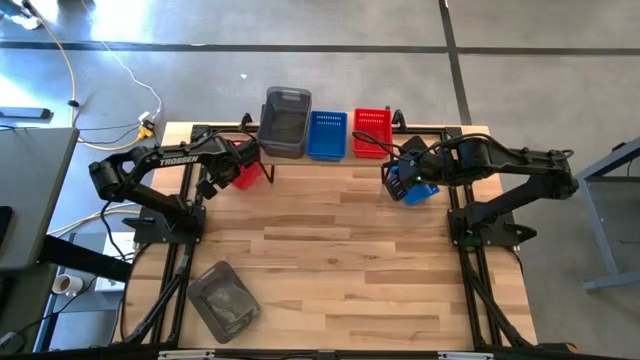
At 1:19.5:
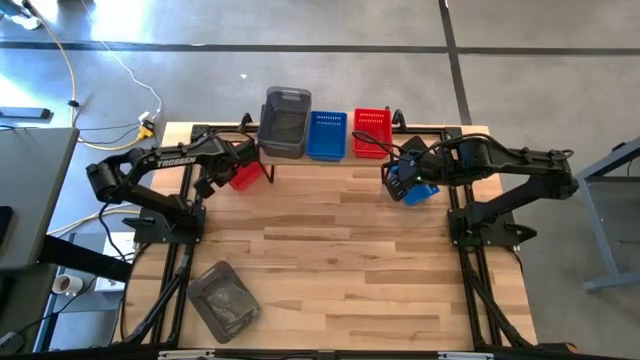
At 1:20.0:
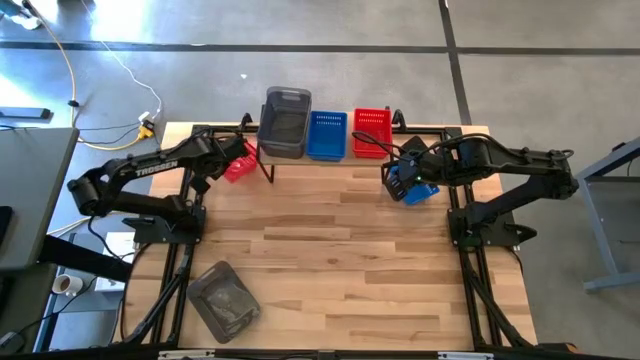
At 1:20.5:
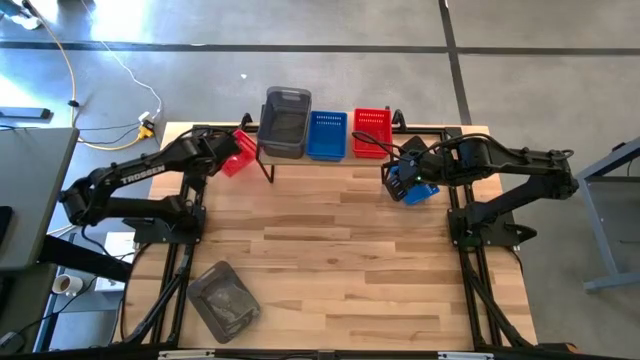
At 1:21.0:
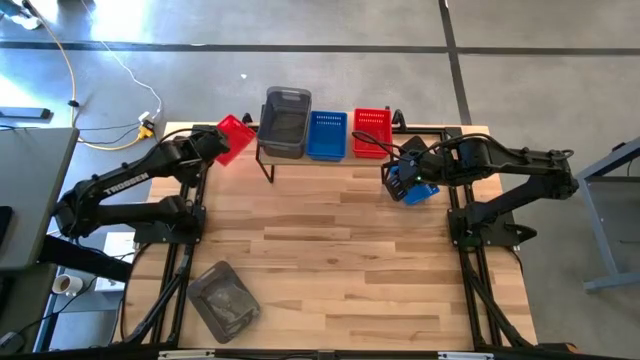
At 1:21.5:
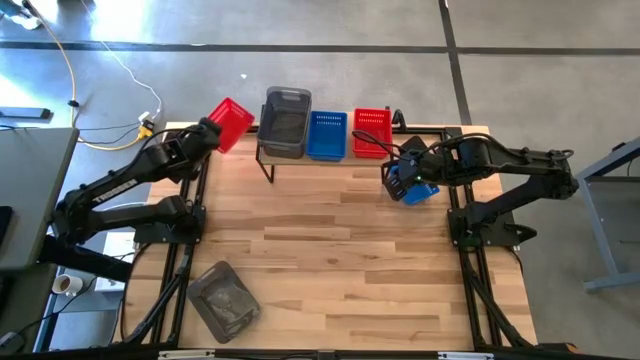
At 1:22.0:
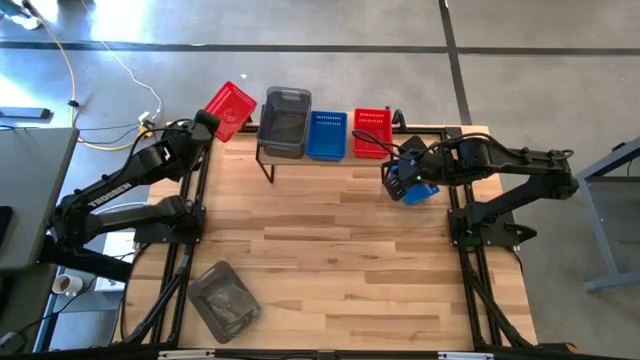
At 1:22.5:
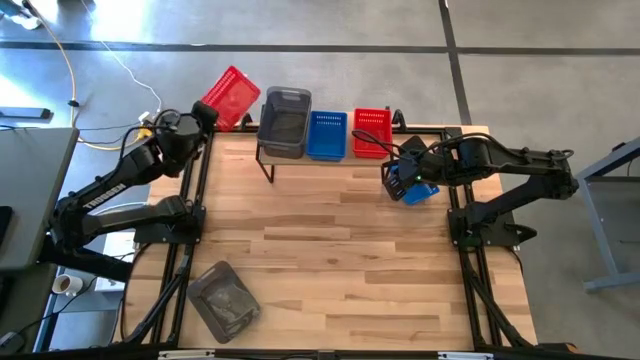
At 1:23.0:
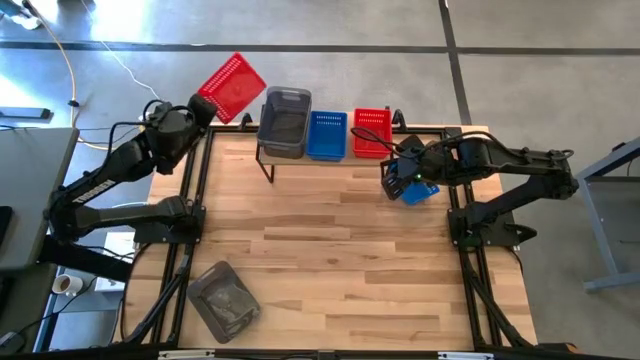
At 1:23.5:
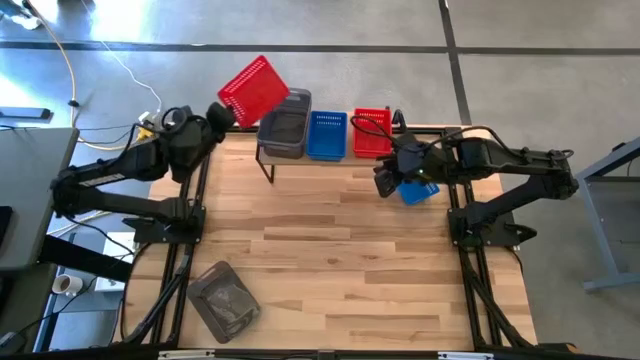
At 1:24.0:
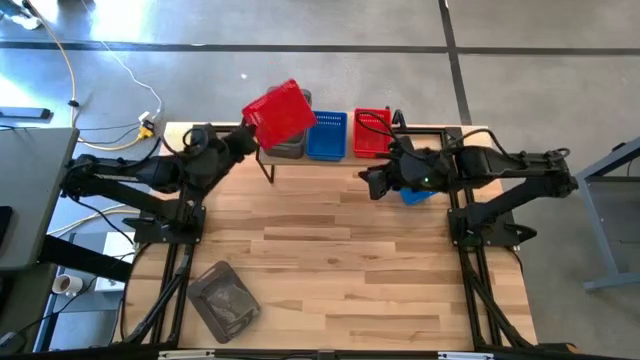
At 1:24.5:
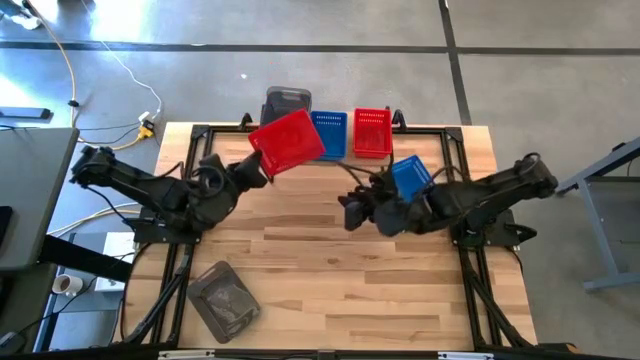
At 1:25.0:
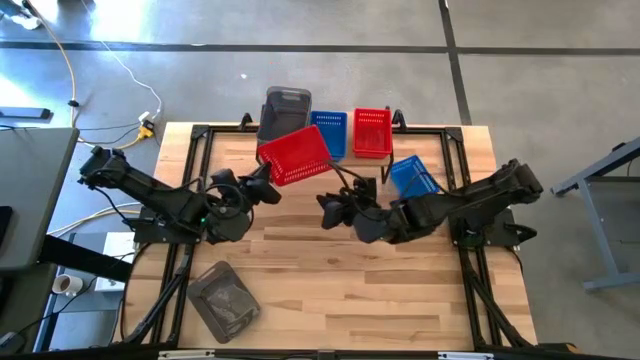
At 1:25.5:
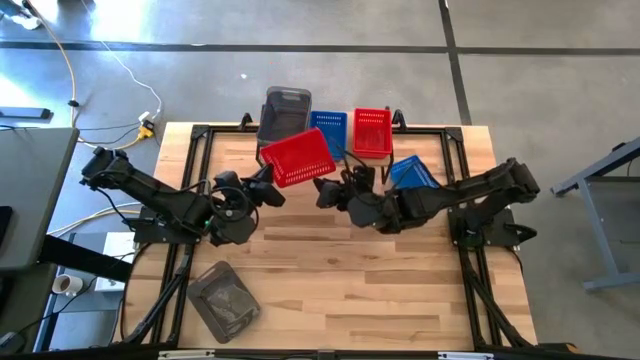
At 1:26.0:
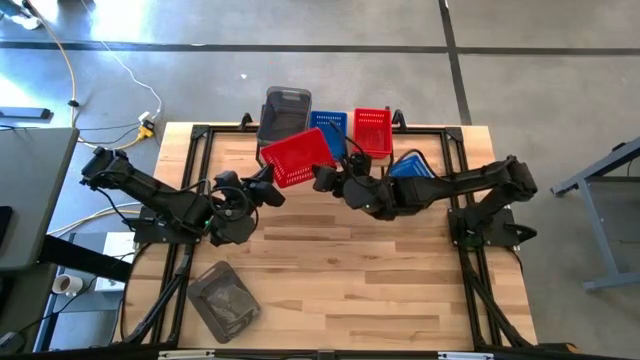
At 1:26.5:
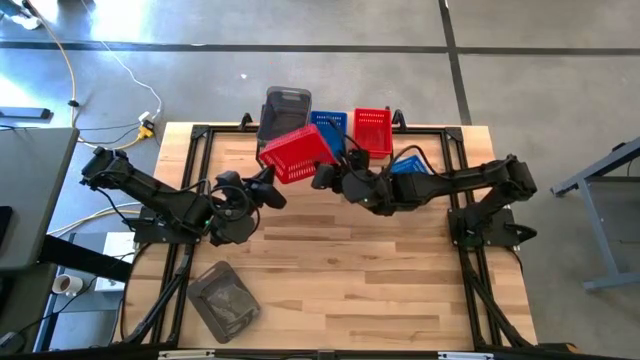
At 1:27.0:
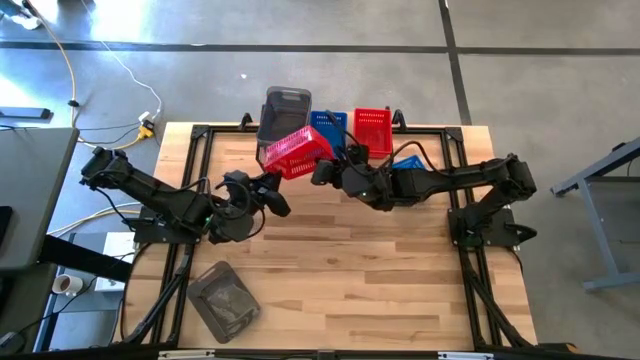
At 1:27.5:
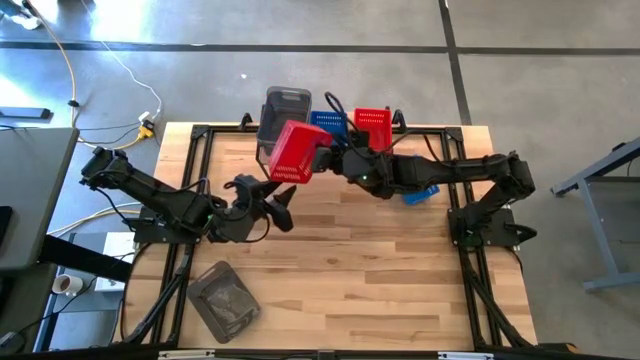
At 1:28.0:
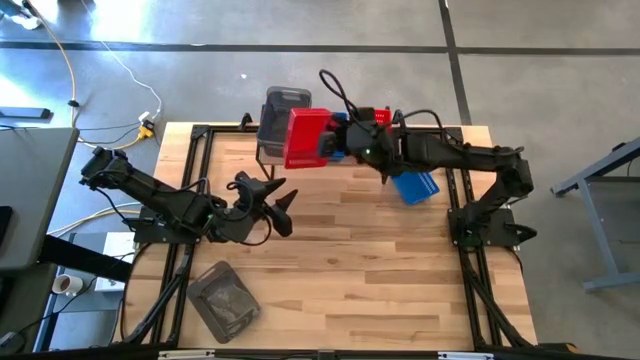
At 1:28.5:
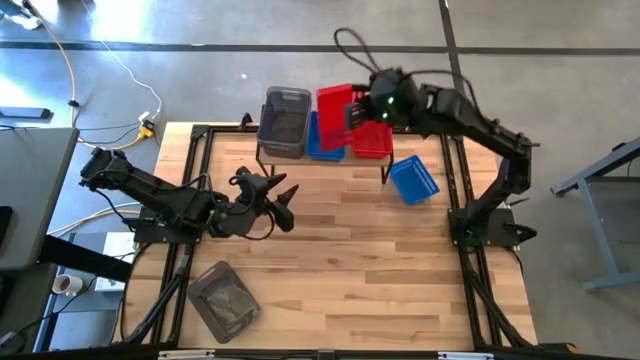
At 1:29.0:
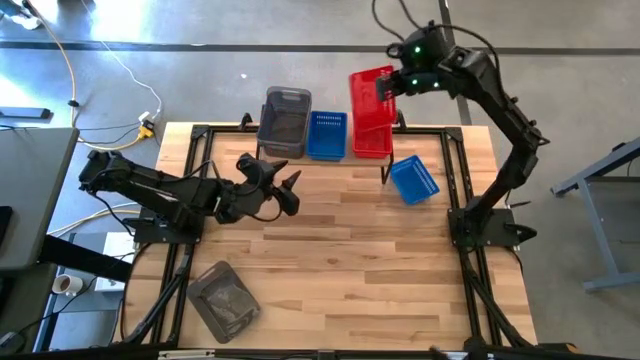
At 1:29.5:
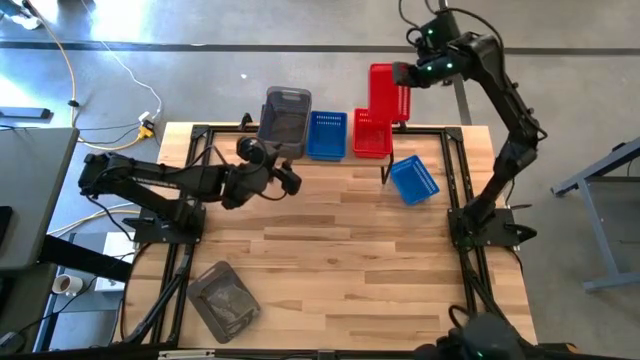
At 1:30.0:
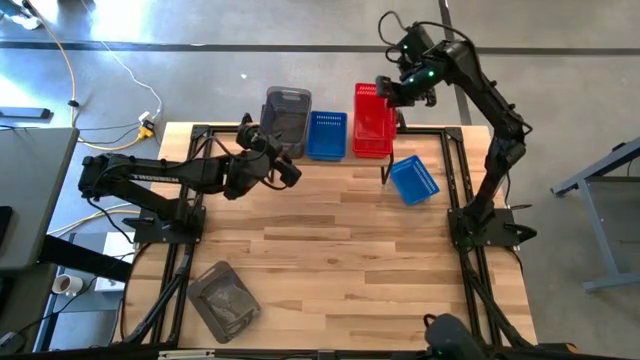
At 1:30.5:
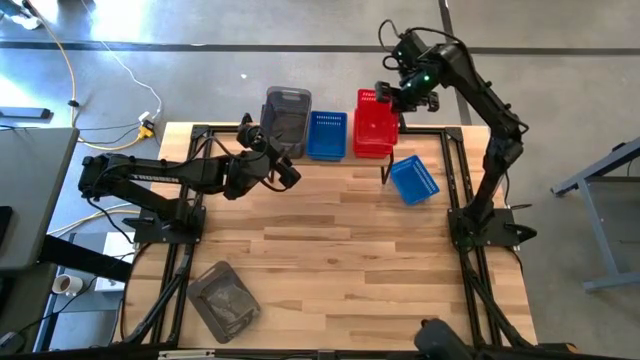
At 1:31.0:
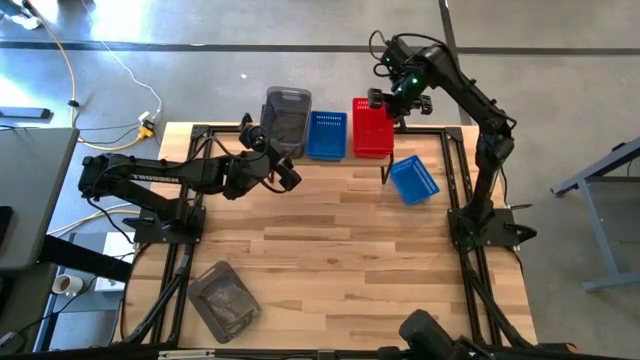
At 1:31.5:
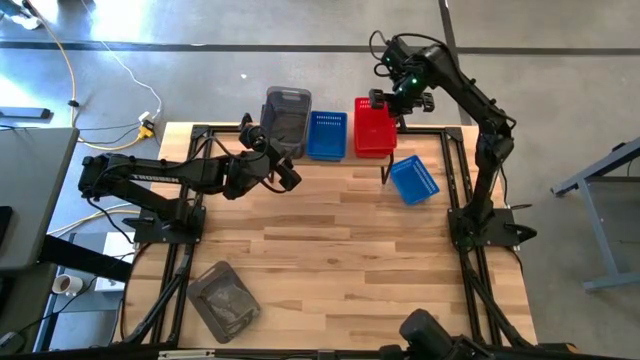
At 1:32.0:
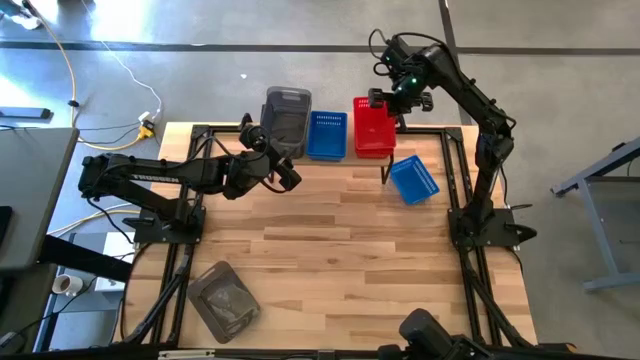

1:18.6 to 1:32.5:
Task: Stack baskets on shelf by color
Stack the red bin on top of the red bin on the shelf

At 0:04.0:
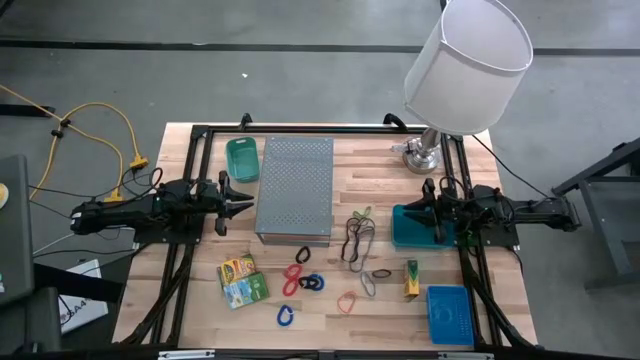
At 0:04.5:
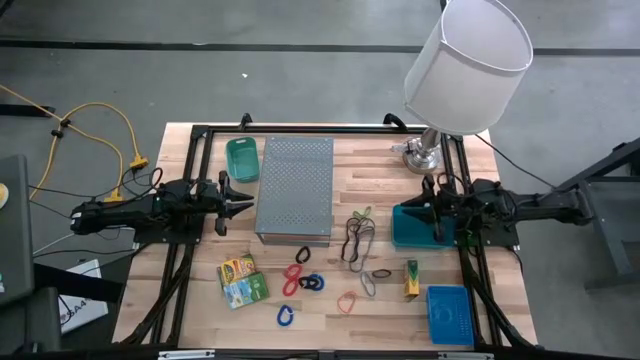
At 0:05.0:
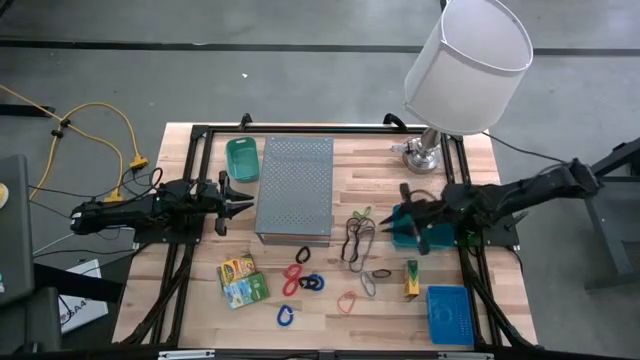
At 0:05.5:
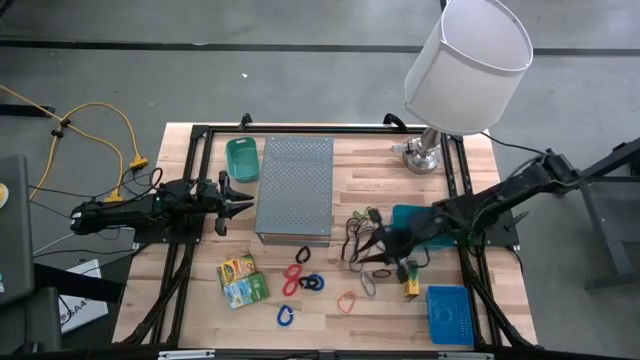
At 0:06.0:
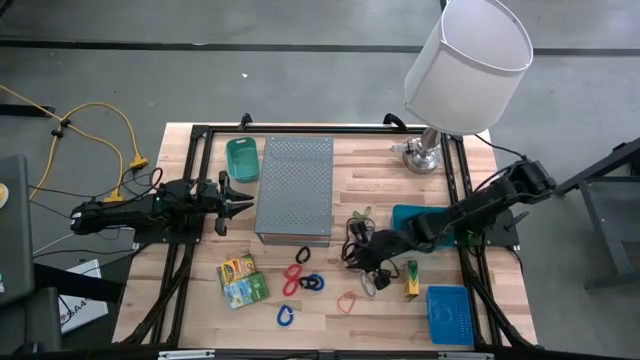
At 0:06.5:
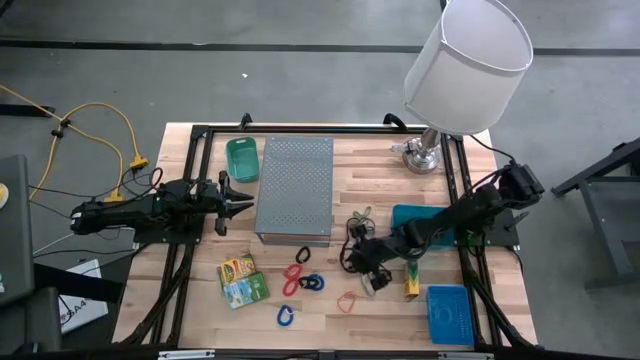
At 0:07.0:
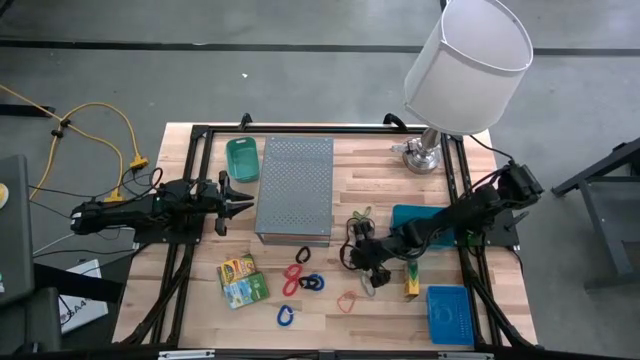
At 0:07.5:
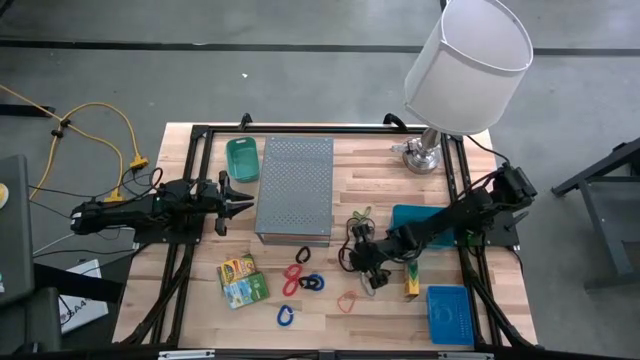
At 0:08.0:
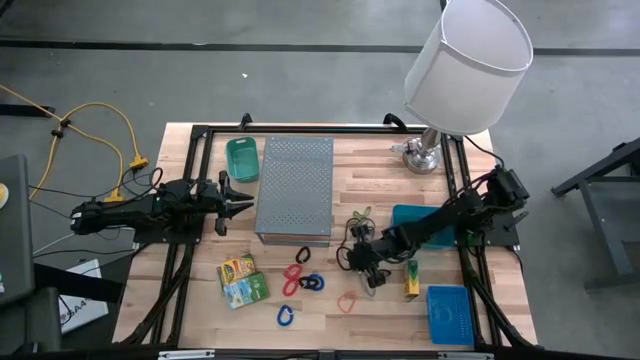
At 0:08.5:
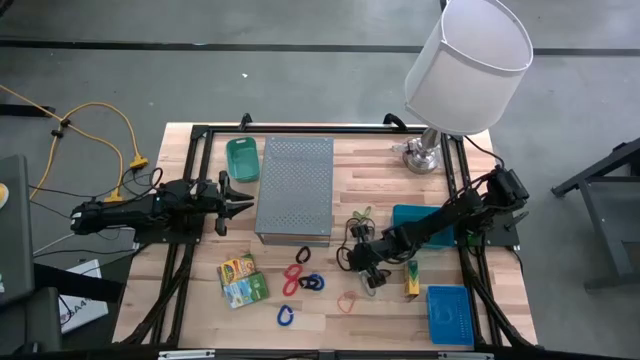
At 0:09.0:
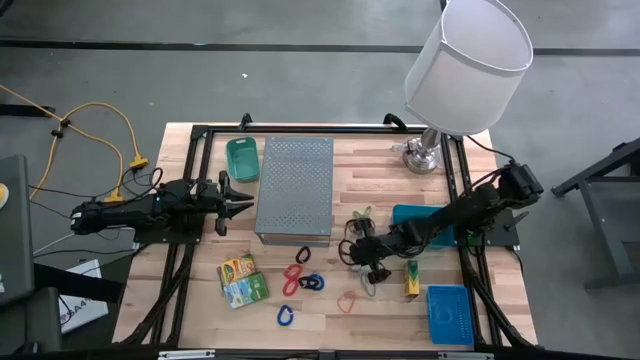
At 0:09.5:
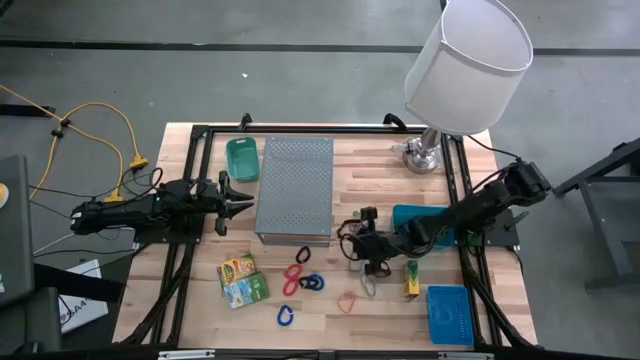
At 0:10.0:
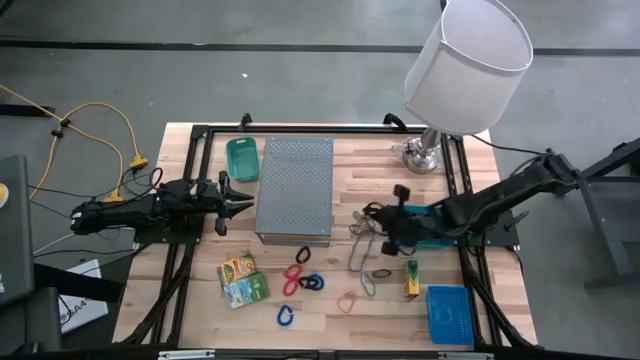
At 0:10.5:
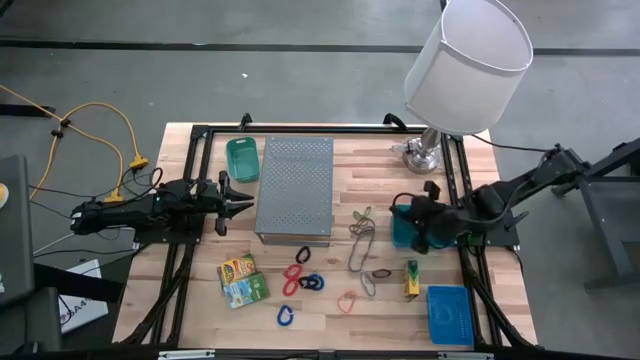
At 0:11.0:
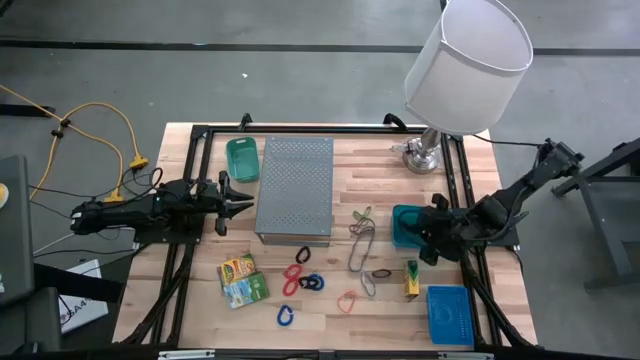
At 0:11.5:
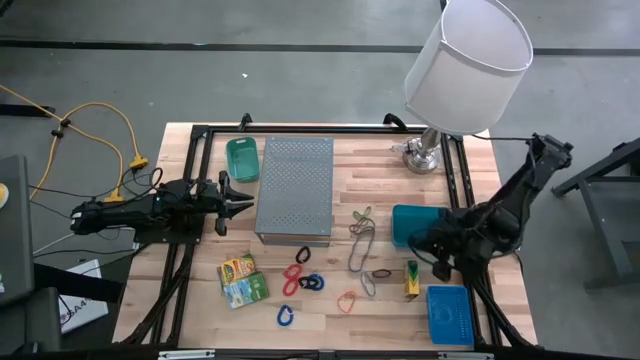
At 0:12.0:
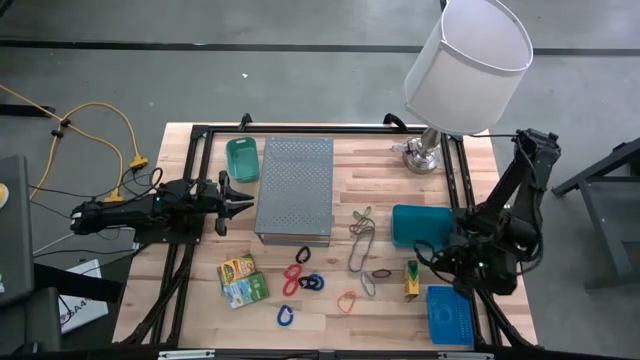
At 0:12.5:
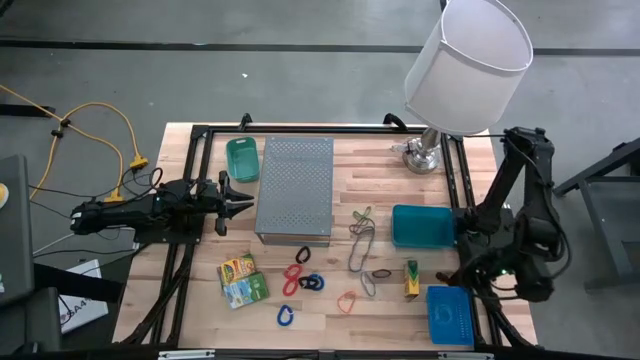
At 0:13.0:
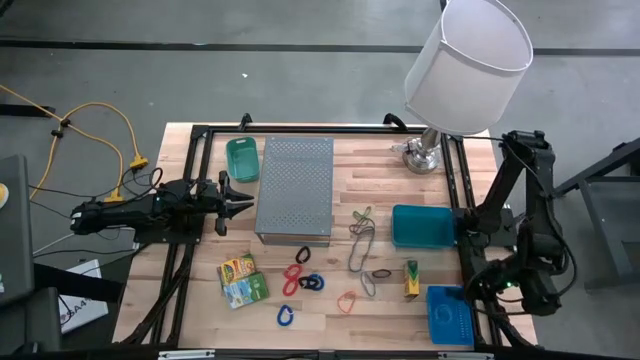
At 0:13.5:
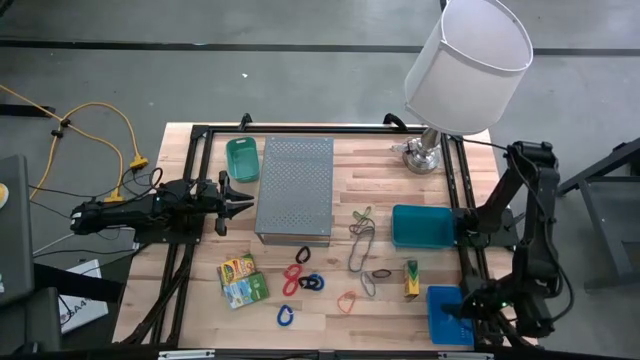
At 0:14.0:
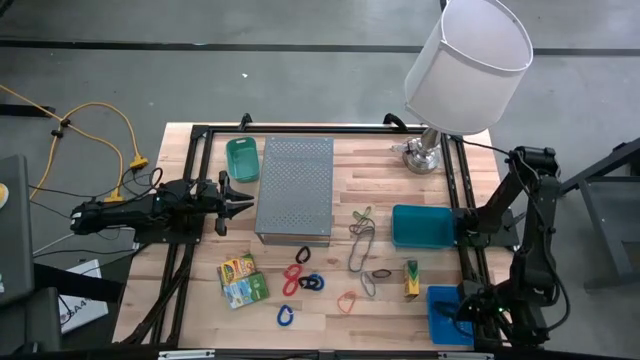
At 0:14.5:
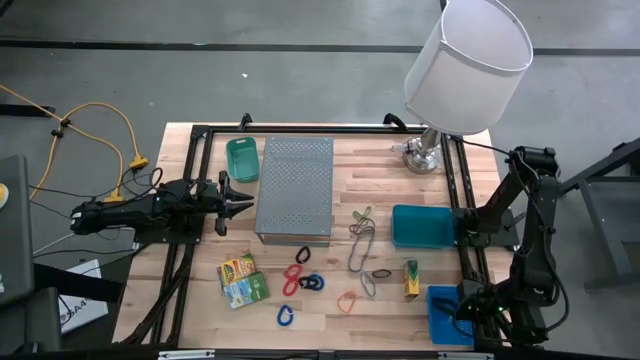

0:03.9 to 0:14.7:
Task: Pick & Place Office Desk Supplies
Put the top black rubberband into the blue basket
